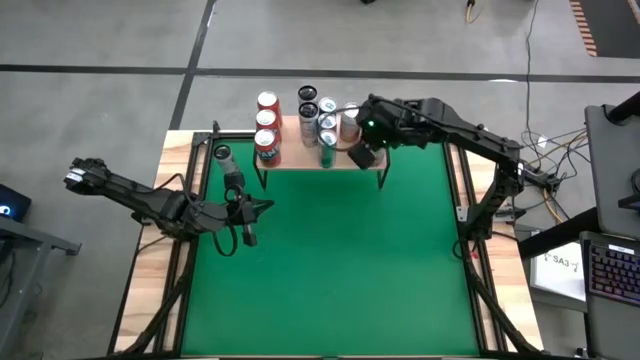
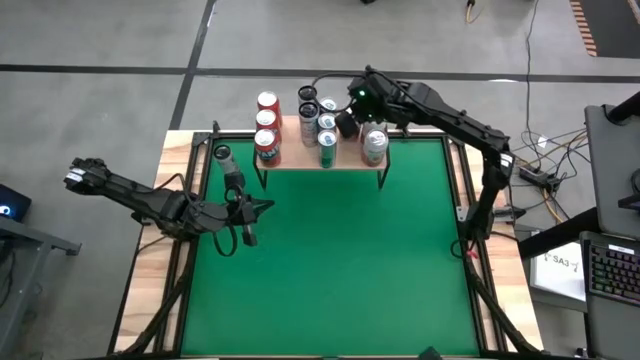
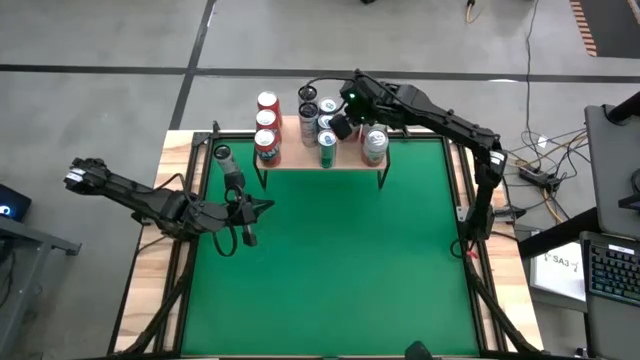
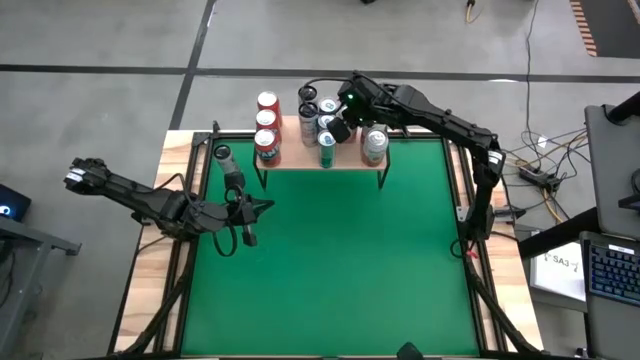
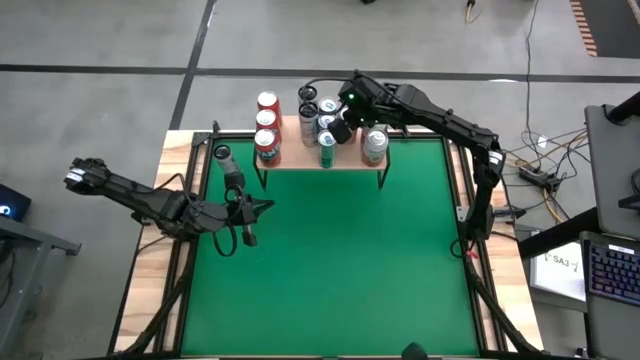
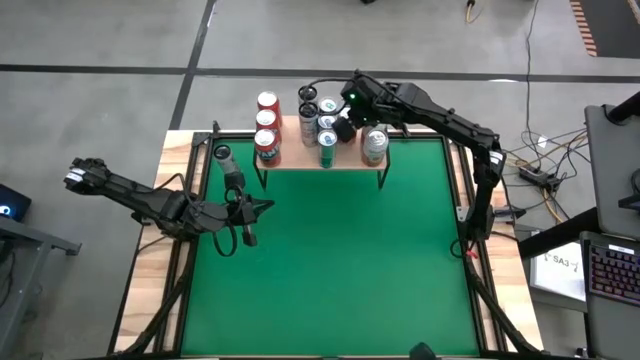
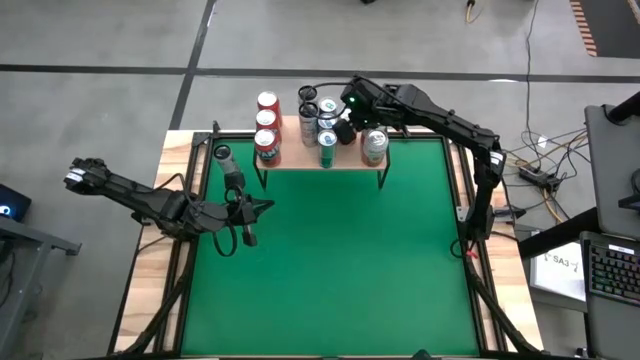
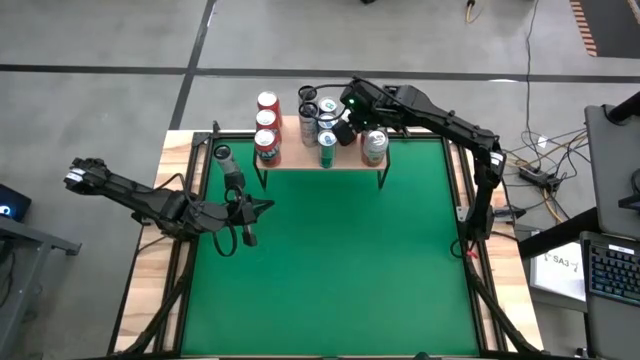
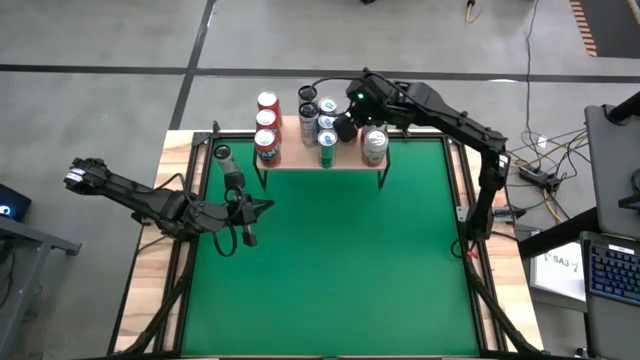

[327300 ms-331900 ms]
Task: Place canned beverage on shelf
Adjust the white orange soda can on the shelf

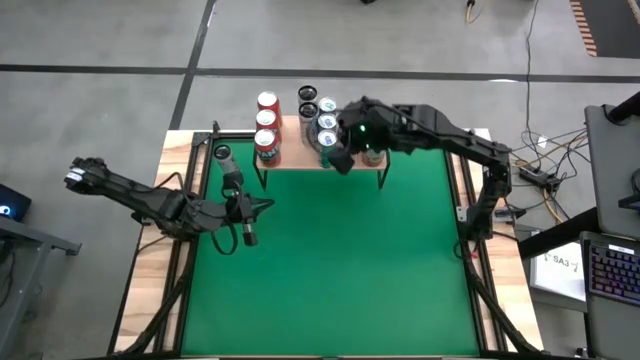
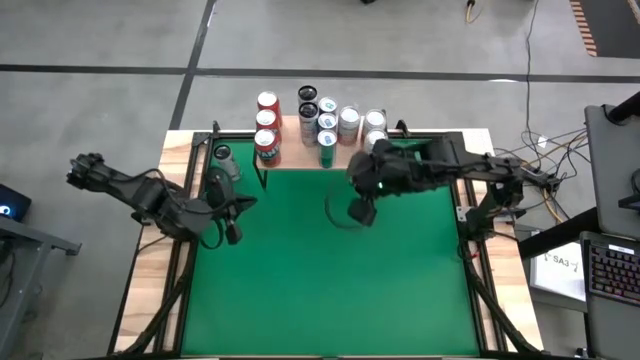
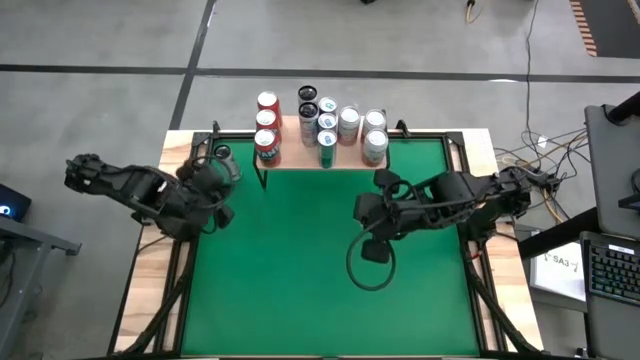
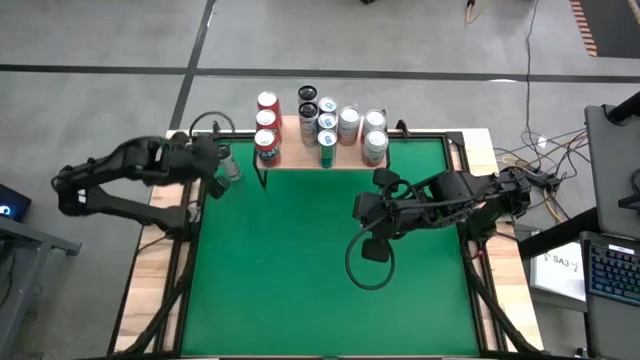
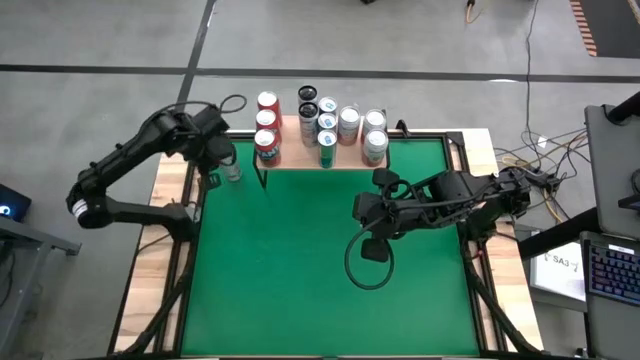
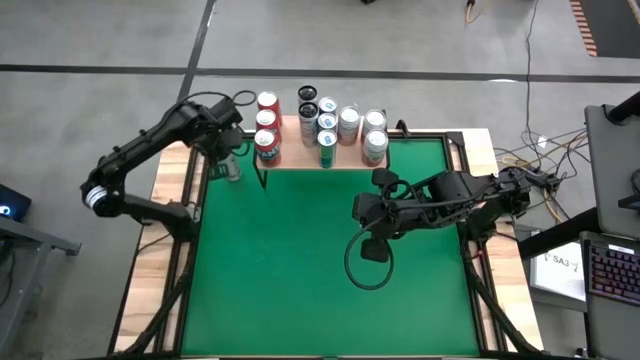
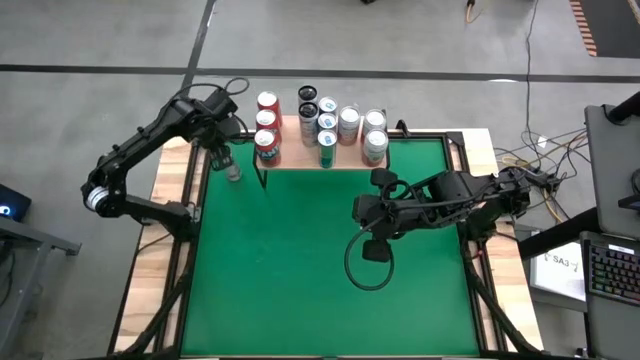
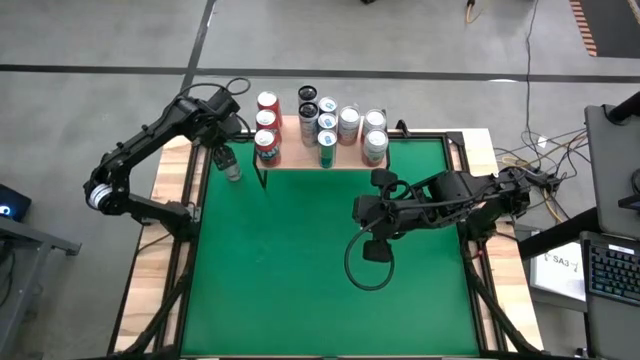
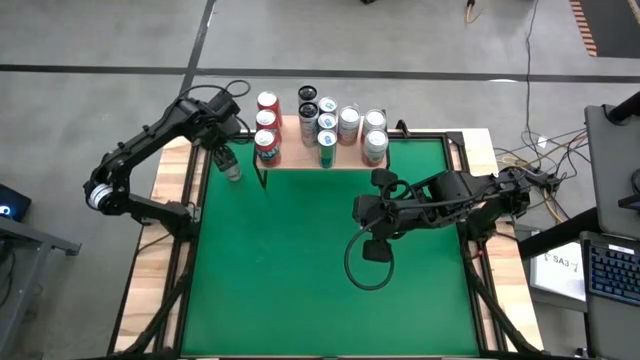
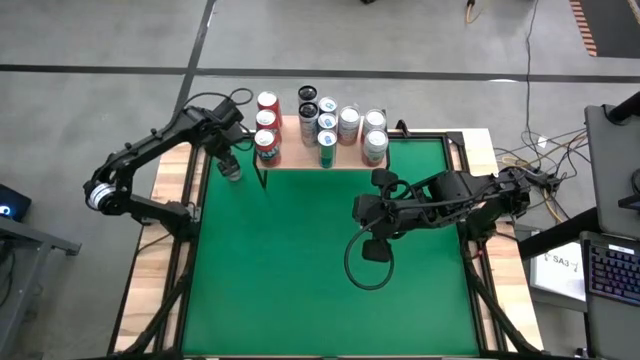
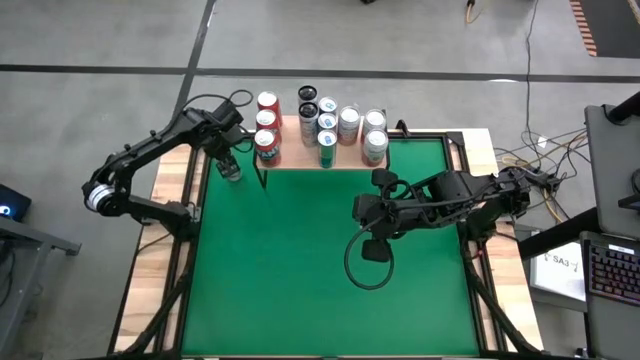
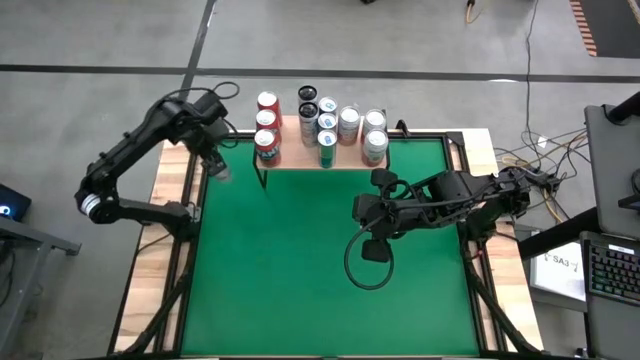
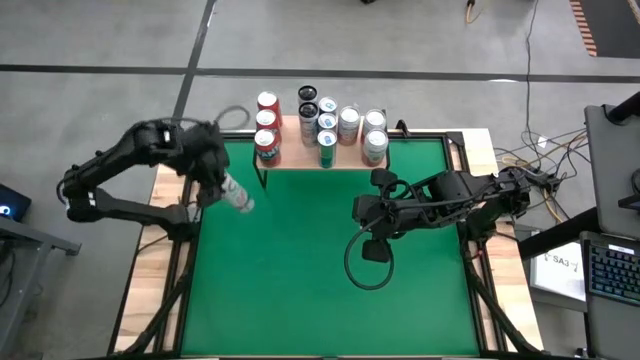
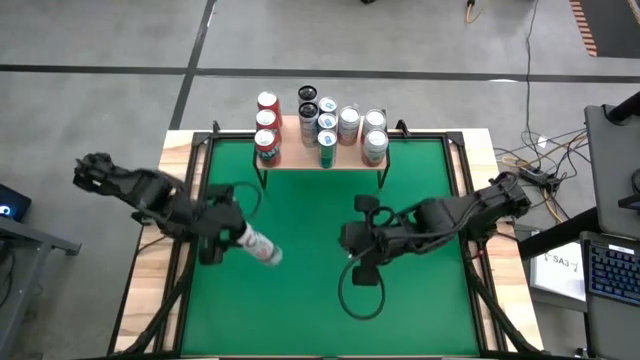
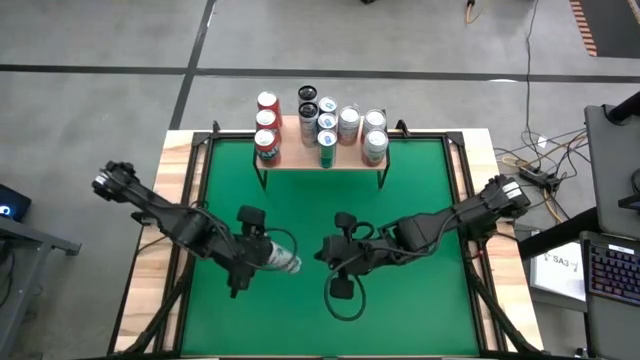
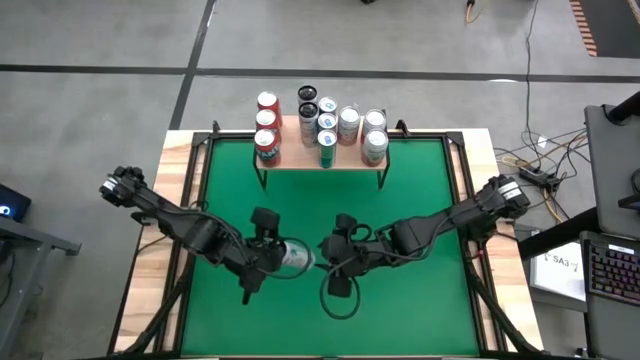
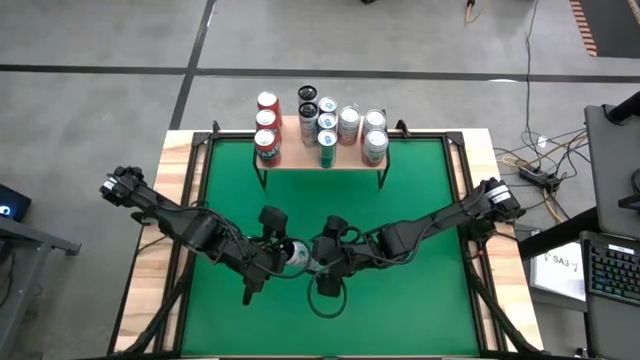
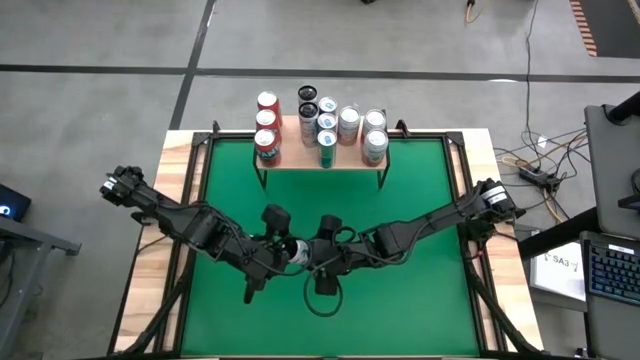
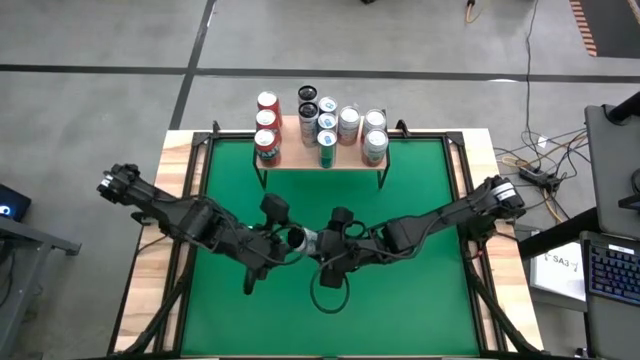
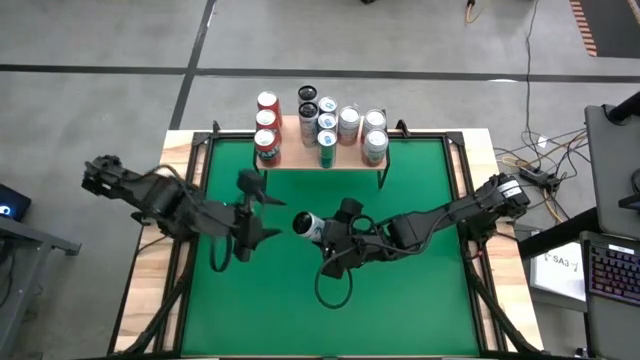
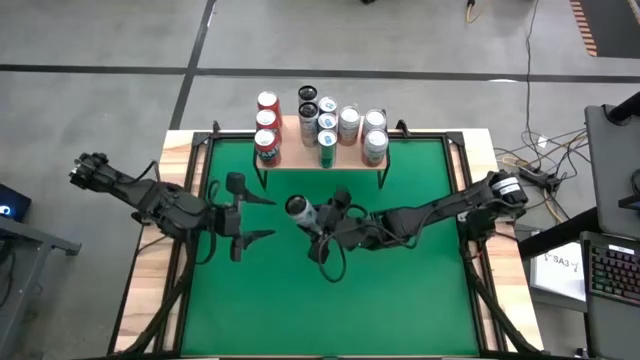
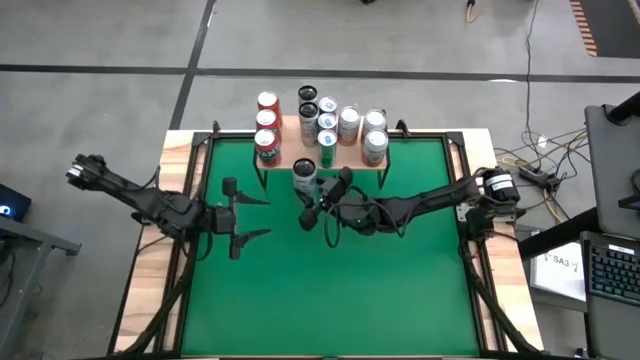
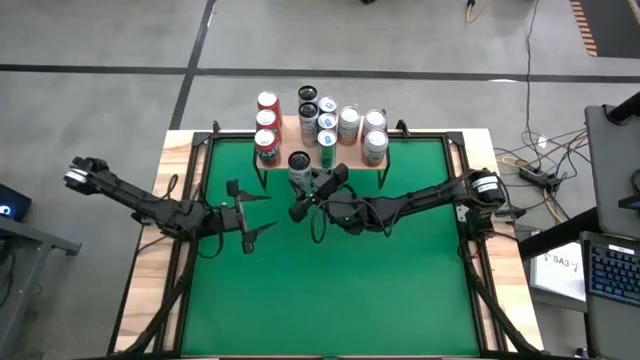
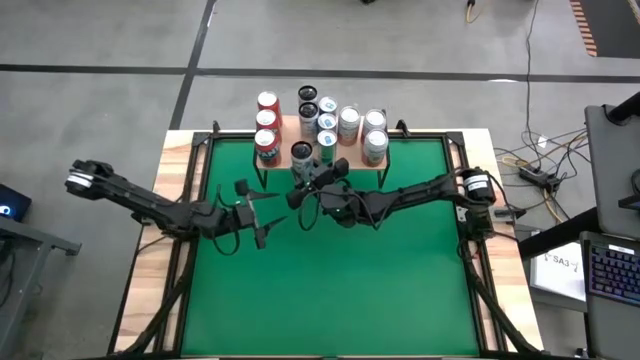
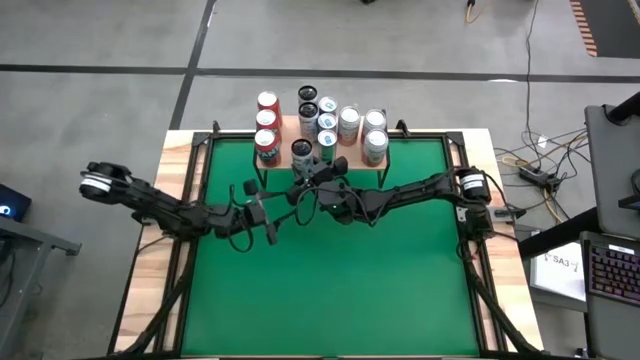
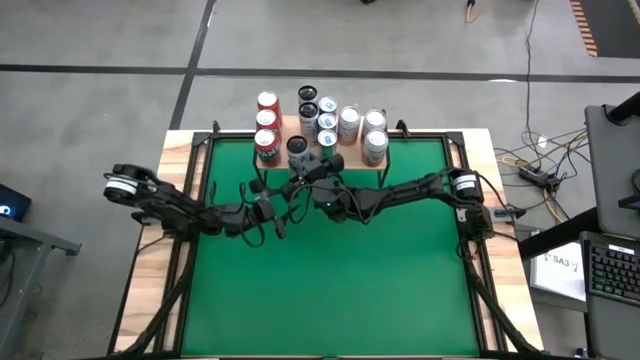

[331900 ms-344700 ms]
Put the white soda can on the shelf aligned with other white soda cans on the shelf

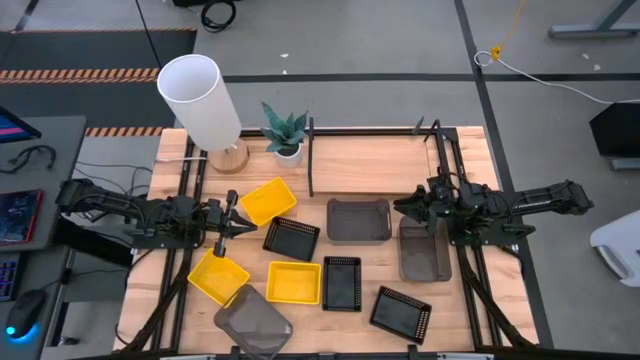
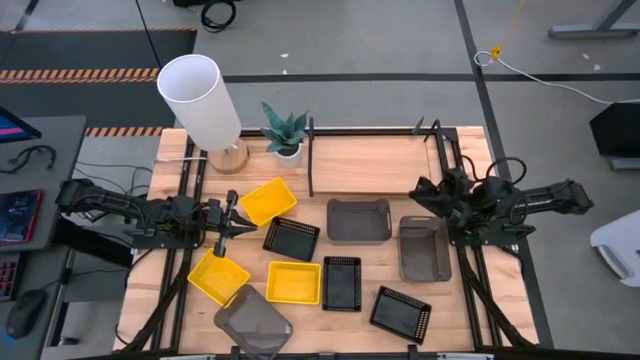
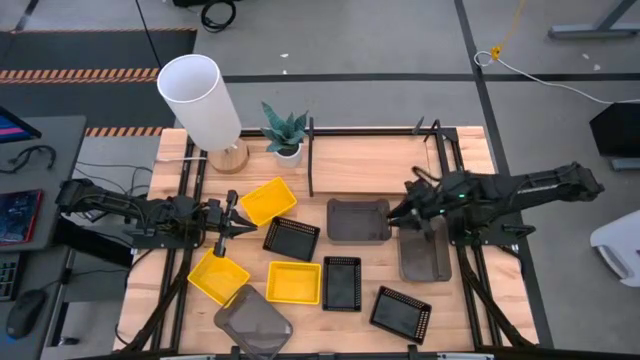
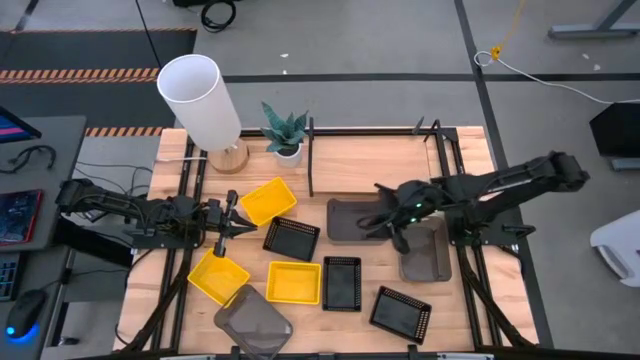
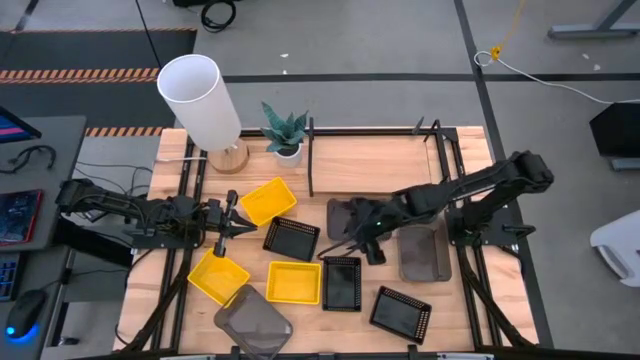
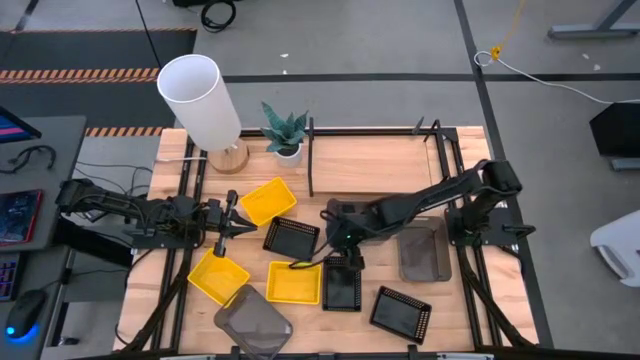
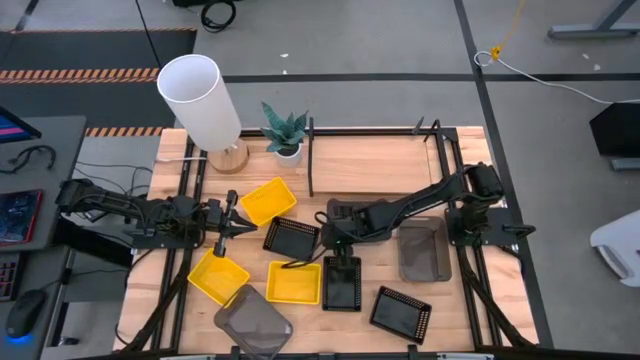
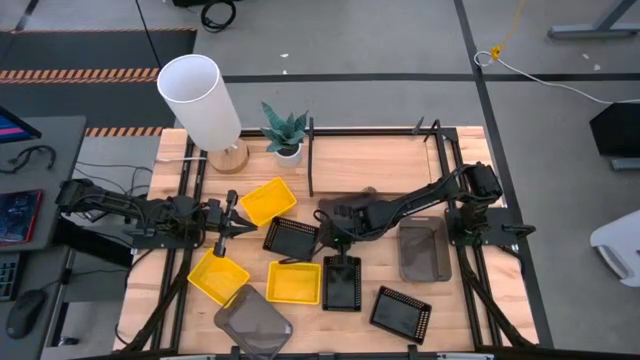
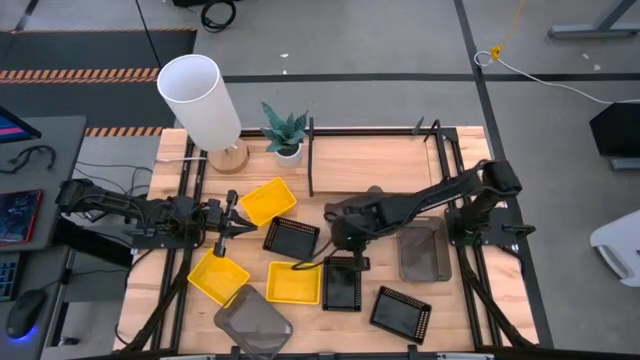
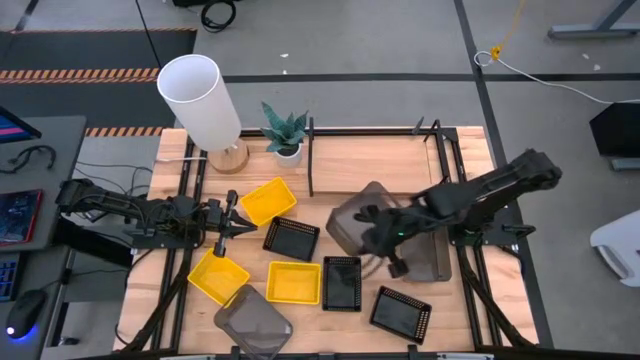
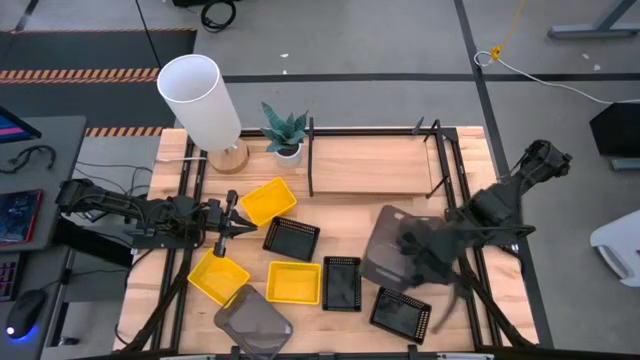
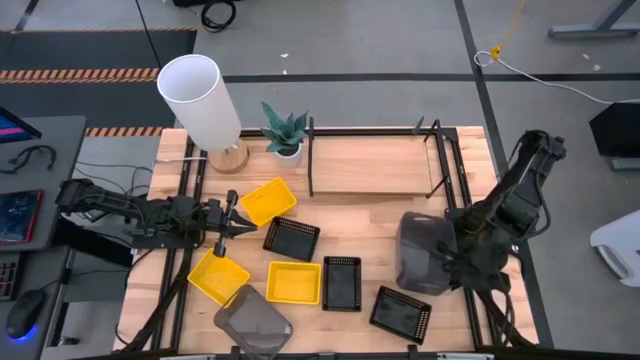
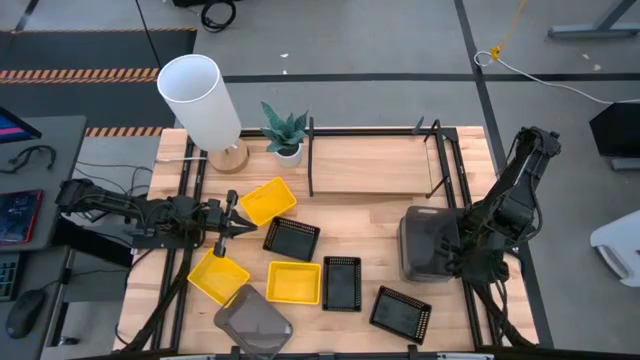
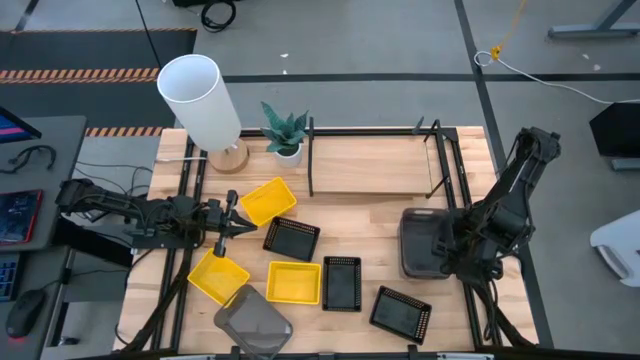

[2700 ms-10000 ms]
Task: Stack baskets on shelf by color
Stack the top black bin on top of the right black bin
